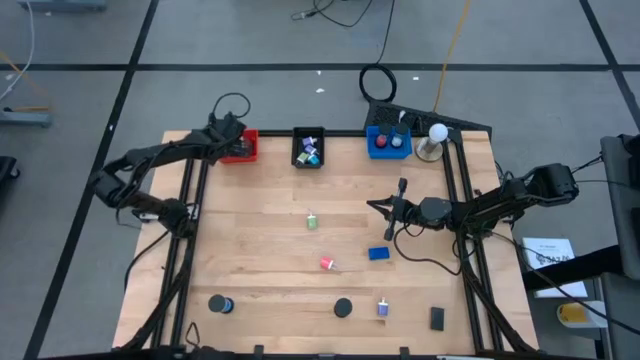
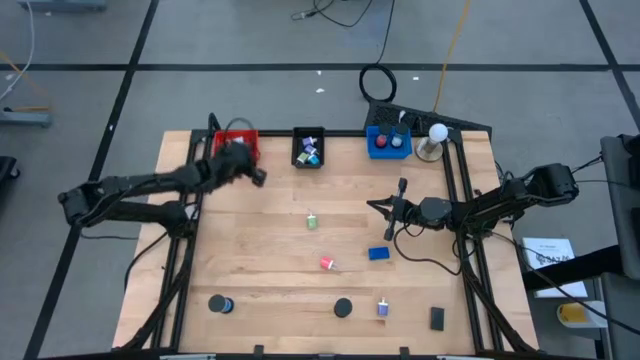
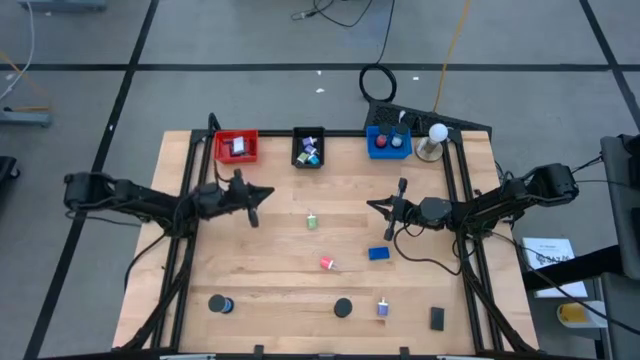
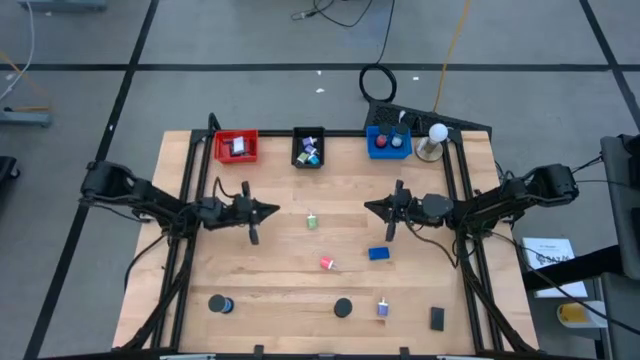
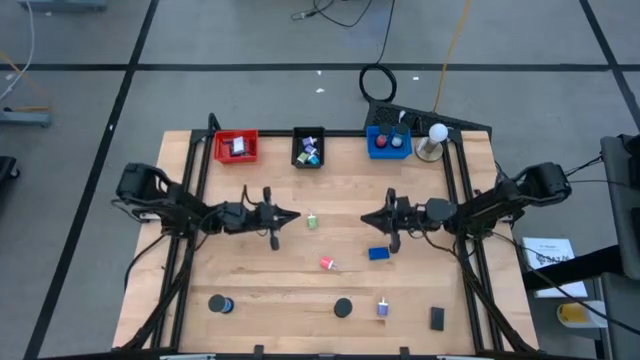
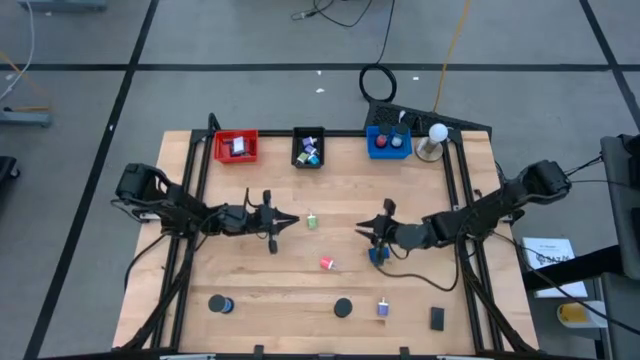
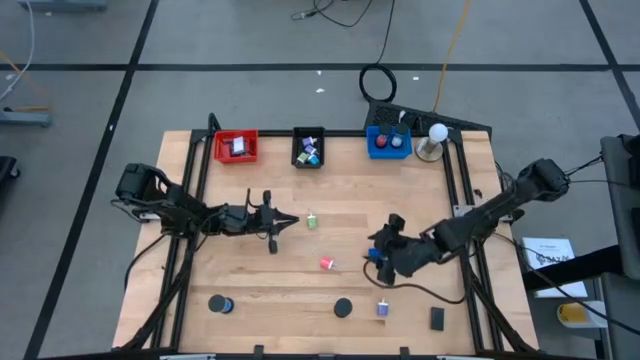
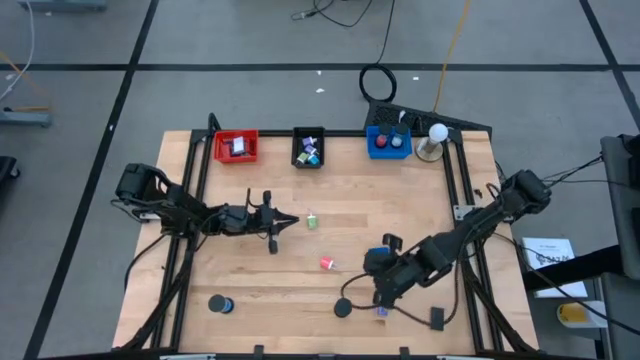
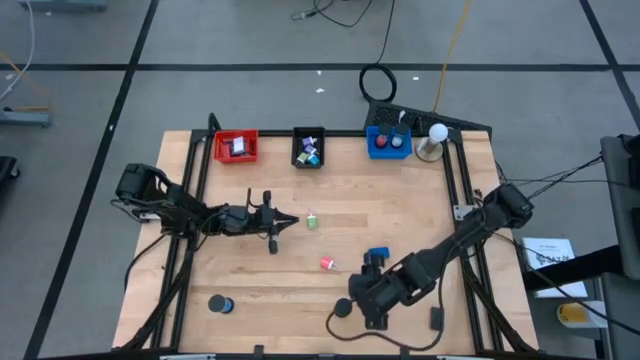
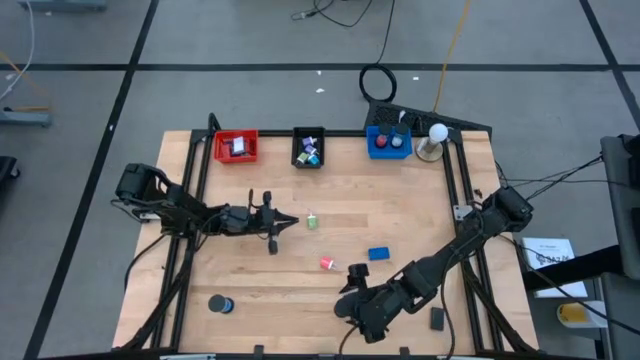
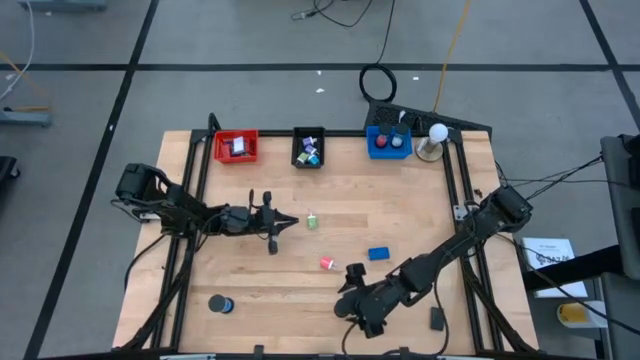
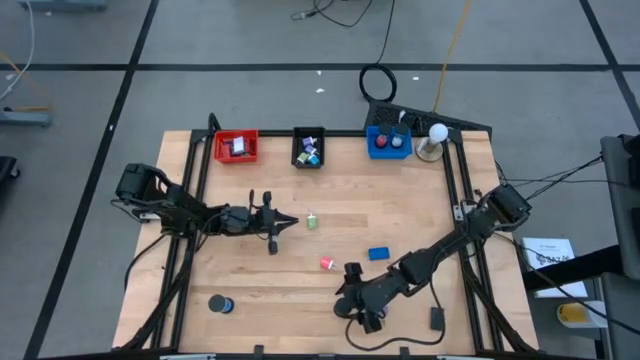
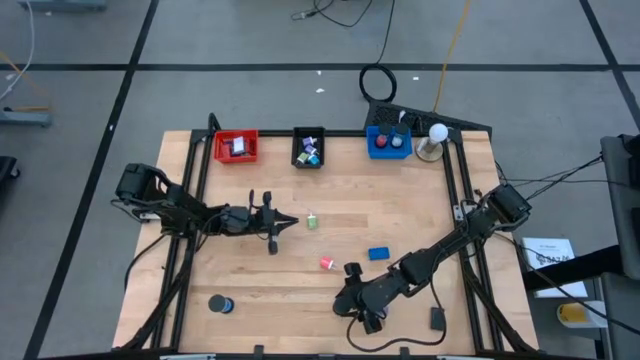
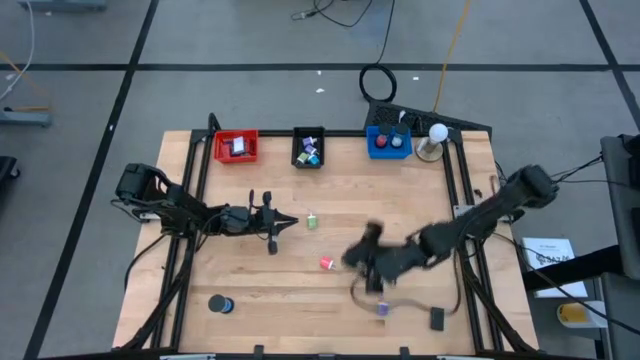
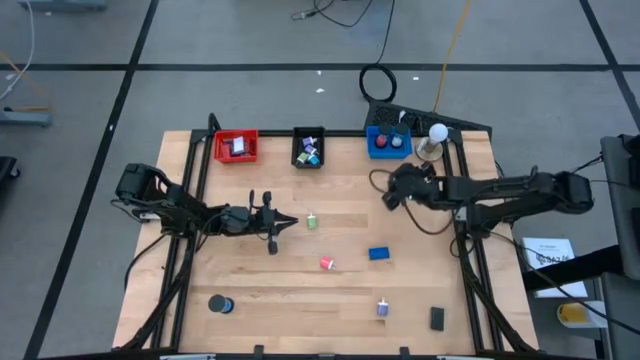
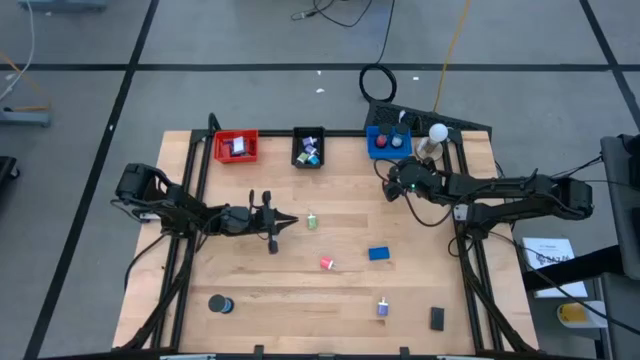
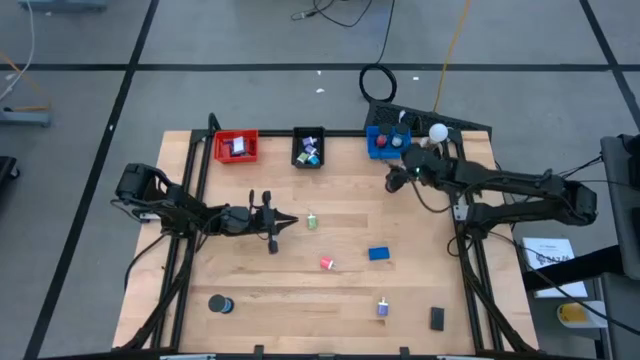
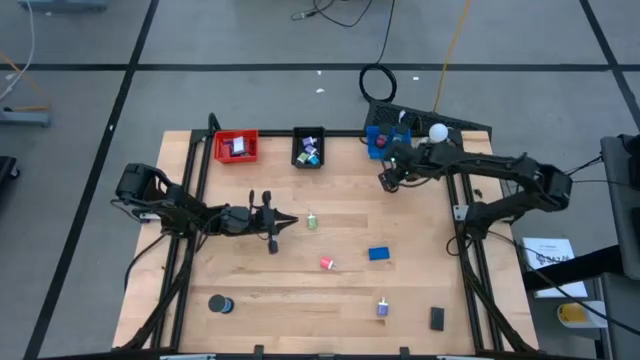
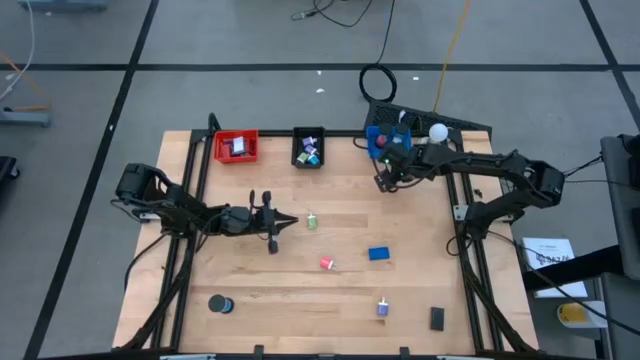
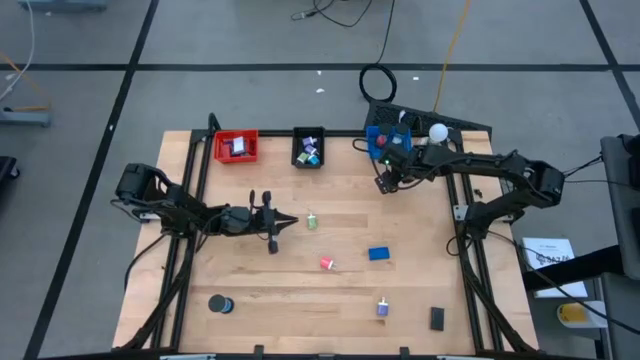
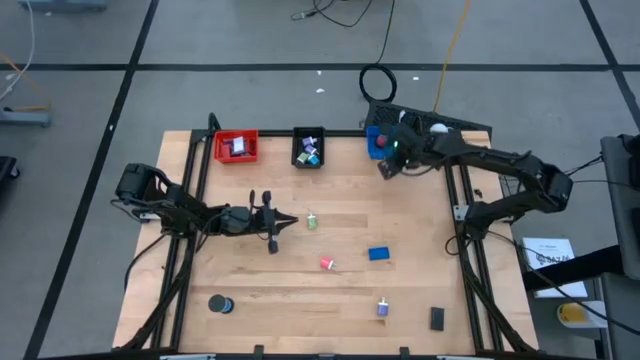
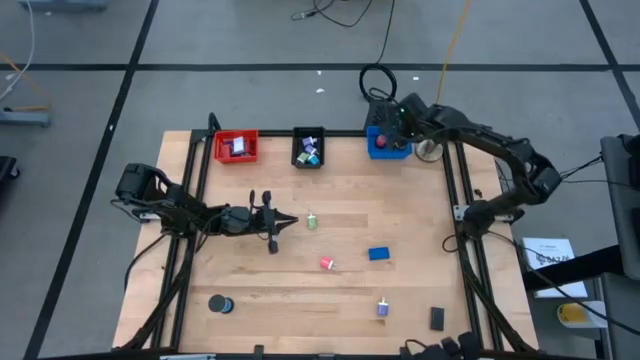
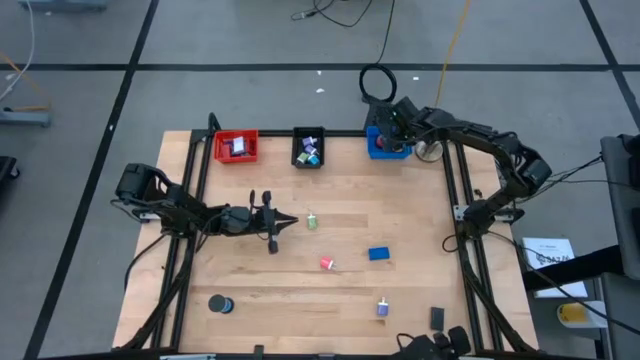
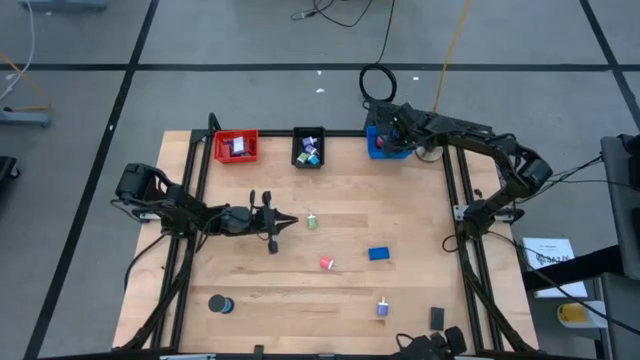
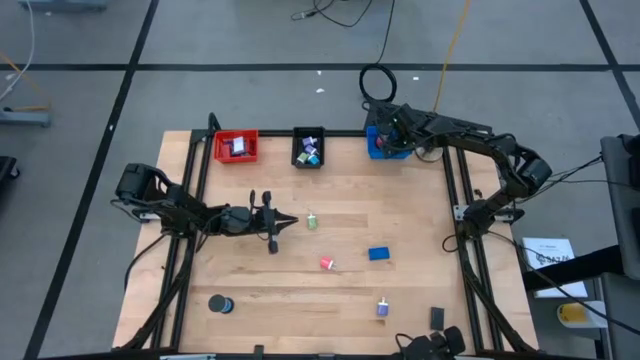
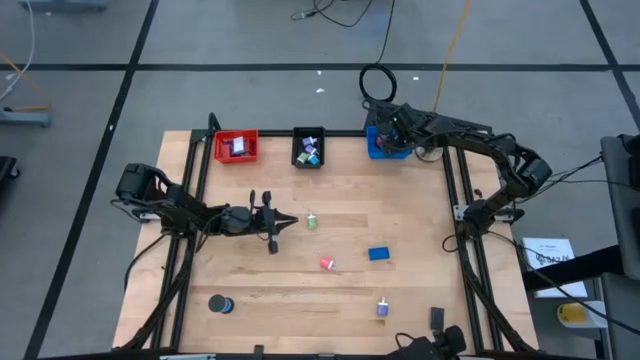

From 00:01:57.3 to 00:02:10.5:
Task: Pick & Place Office items
Put the yellow hourglass into the blue bin

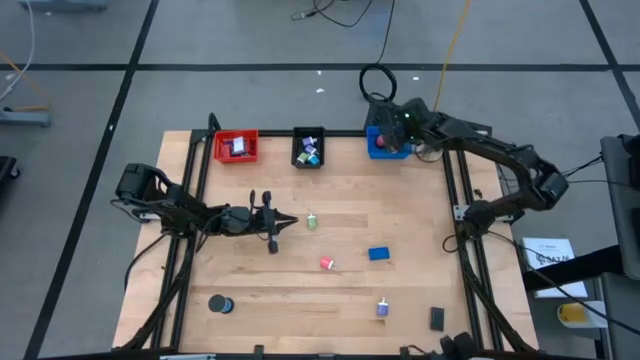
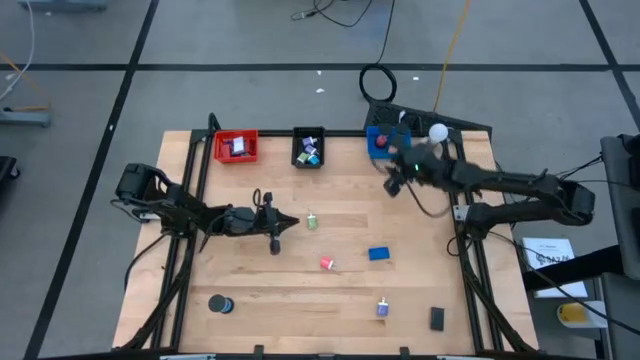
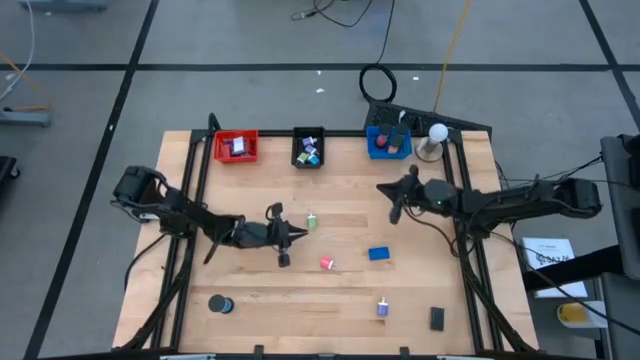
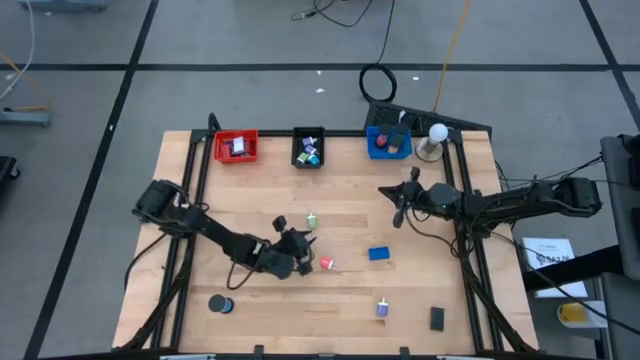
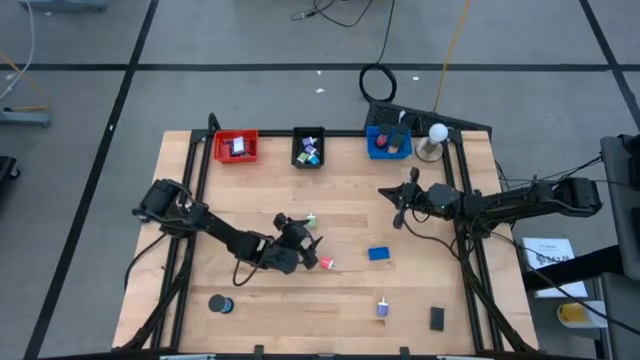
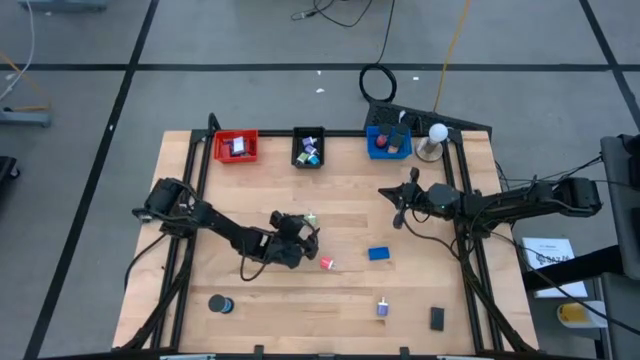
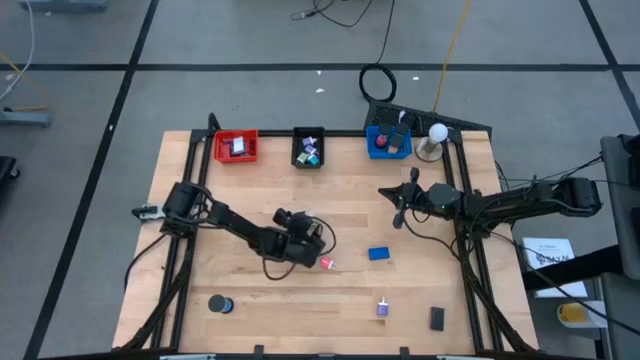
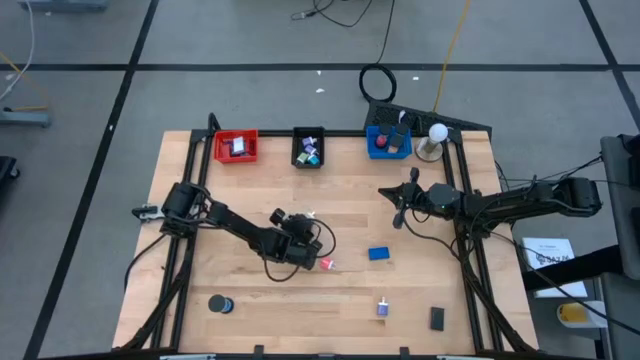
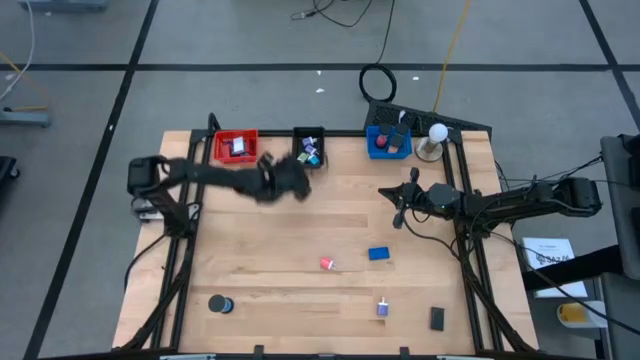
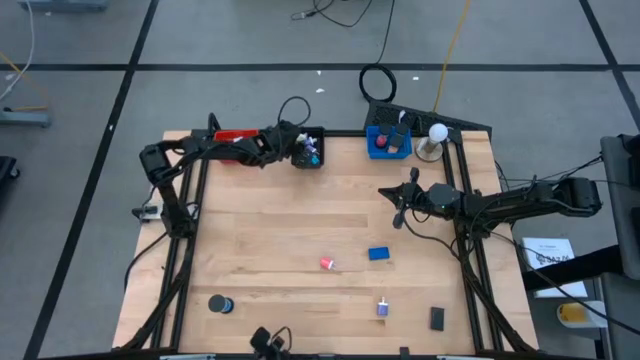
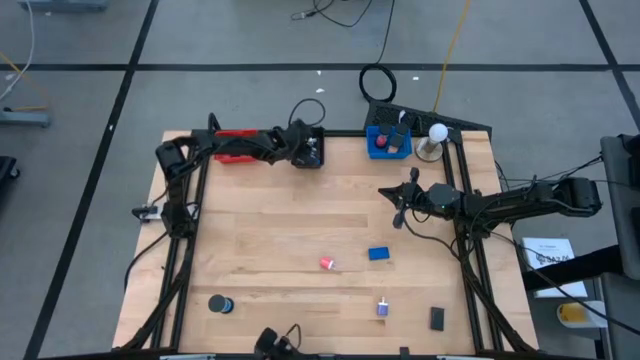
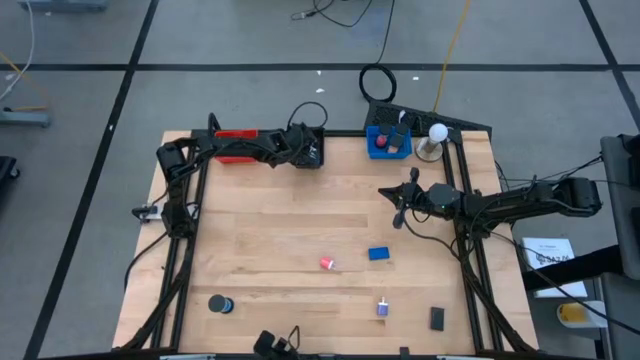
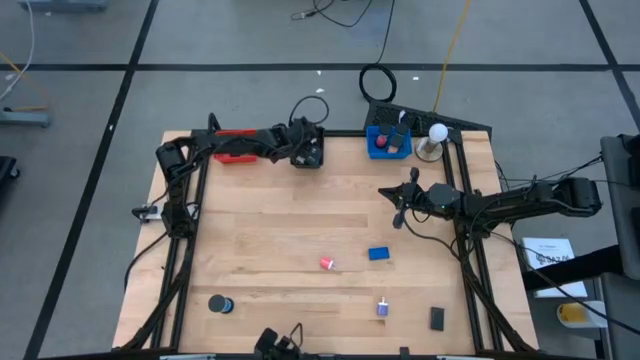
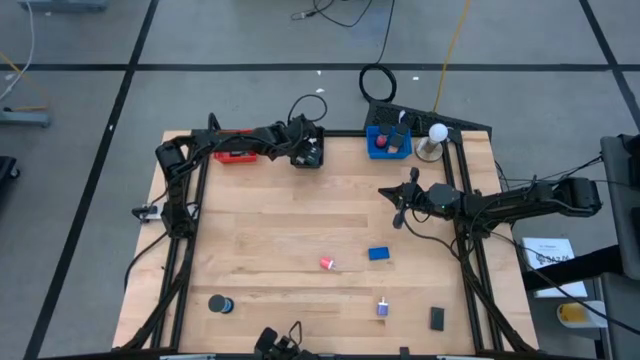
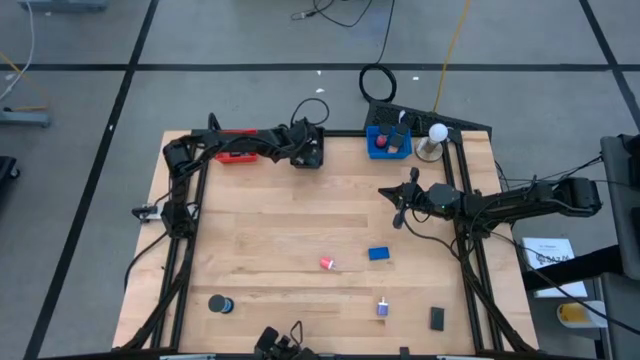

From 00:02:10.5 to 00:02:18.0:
Put the green charger adapter head into the black bin
